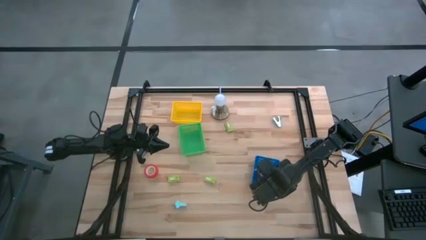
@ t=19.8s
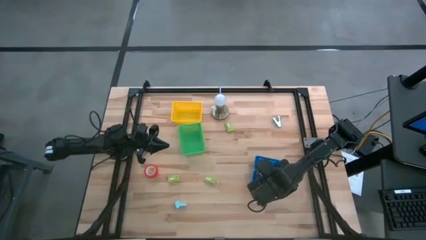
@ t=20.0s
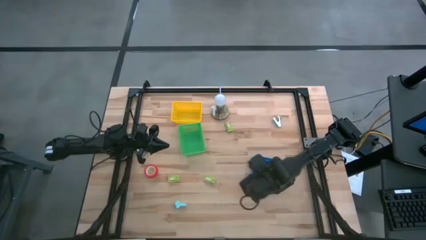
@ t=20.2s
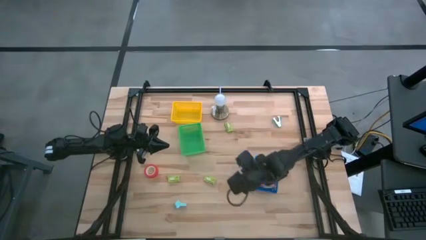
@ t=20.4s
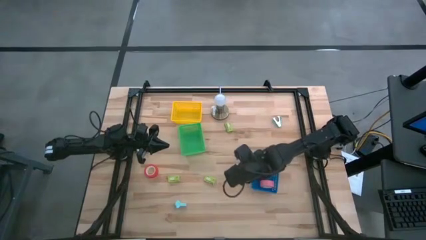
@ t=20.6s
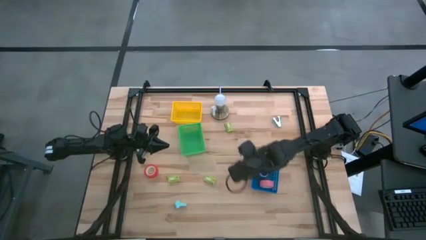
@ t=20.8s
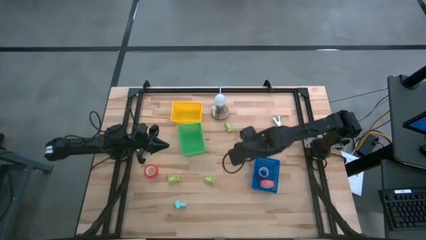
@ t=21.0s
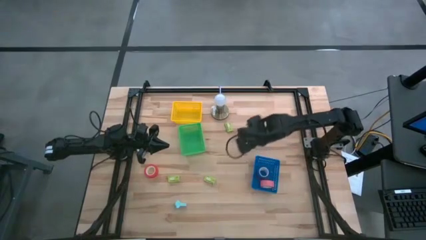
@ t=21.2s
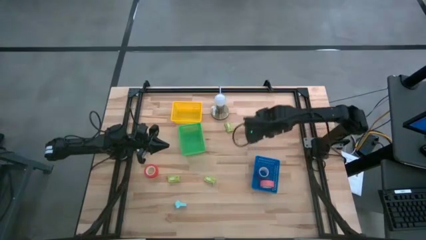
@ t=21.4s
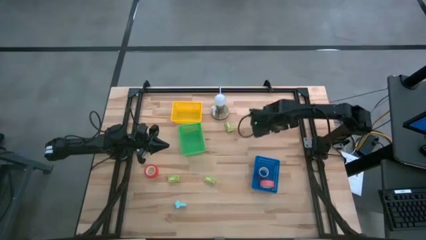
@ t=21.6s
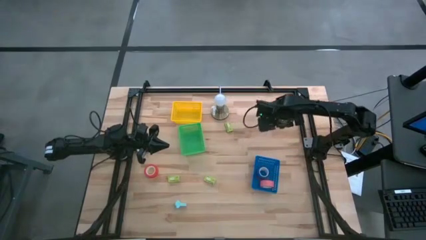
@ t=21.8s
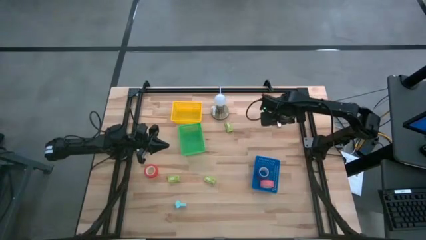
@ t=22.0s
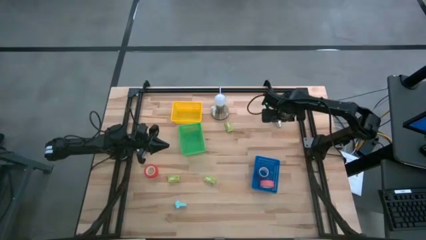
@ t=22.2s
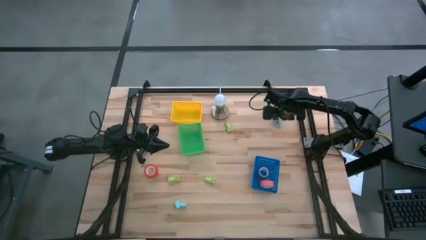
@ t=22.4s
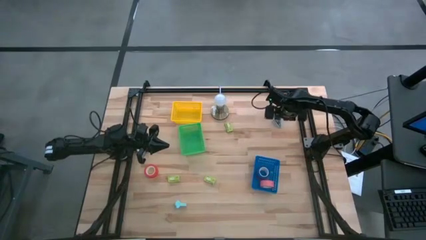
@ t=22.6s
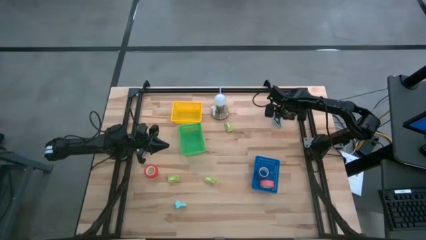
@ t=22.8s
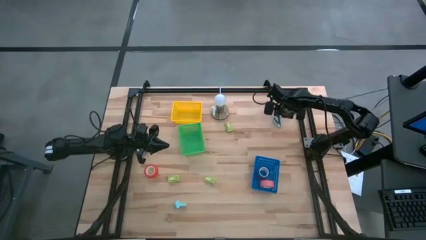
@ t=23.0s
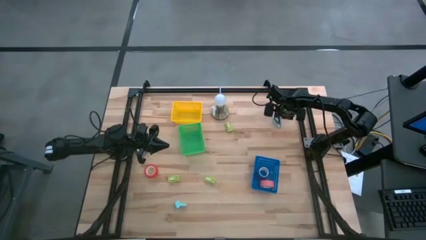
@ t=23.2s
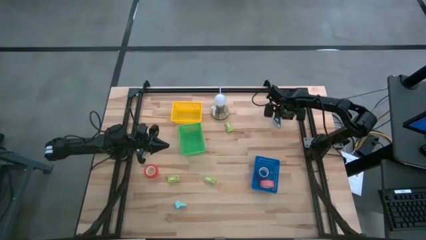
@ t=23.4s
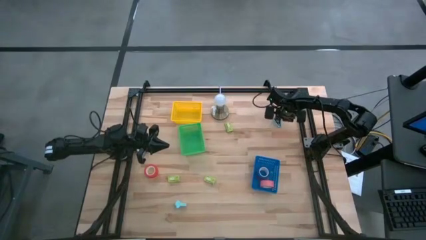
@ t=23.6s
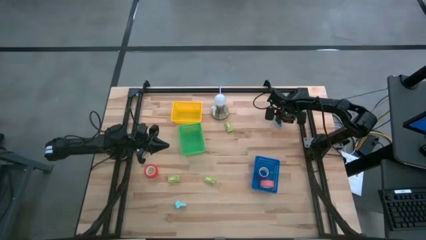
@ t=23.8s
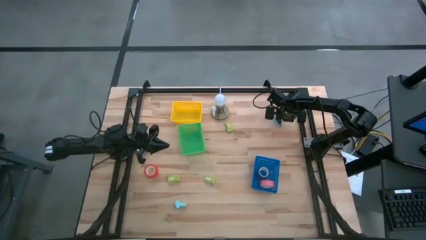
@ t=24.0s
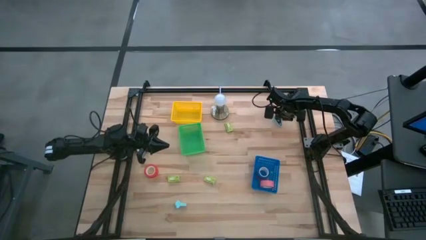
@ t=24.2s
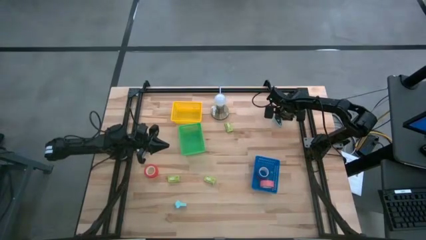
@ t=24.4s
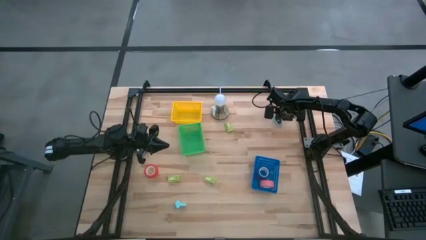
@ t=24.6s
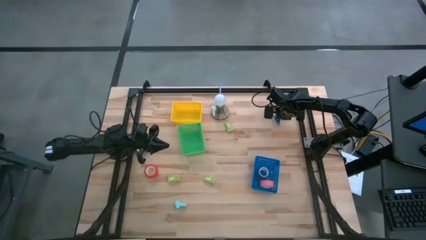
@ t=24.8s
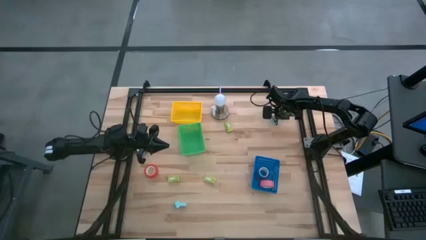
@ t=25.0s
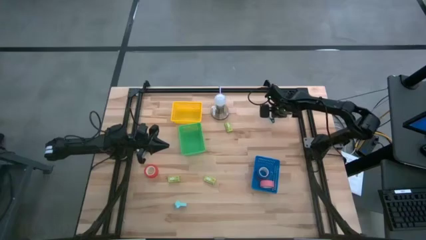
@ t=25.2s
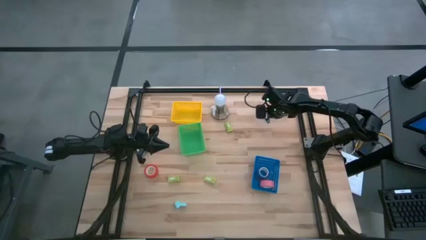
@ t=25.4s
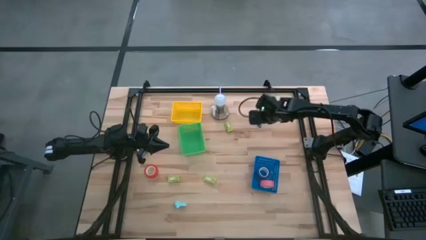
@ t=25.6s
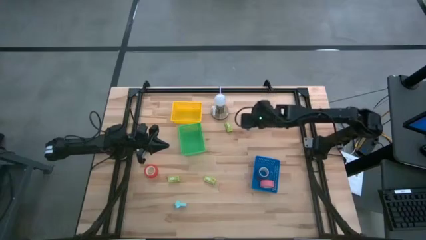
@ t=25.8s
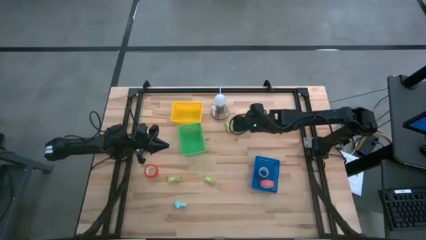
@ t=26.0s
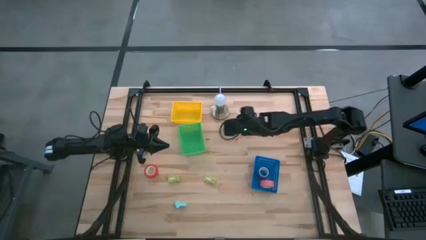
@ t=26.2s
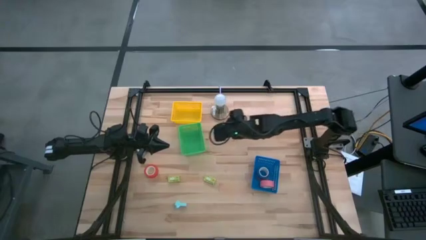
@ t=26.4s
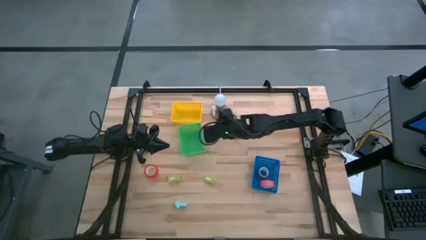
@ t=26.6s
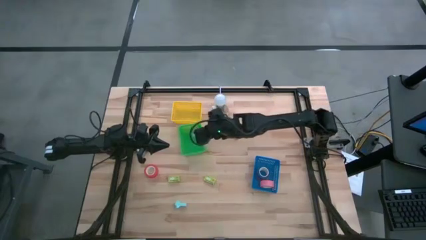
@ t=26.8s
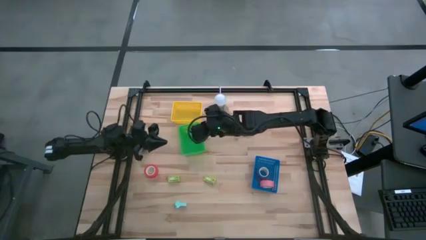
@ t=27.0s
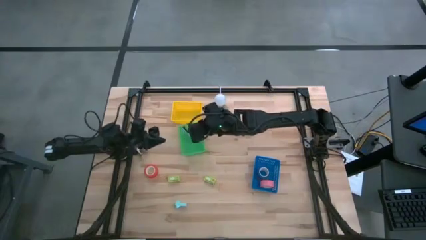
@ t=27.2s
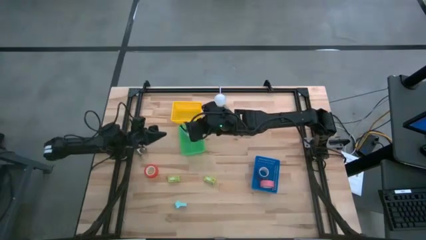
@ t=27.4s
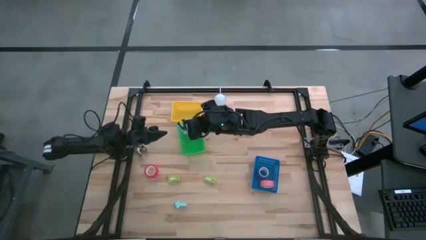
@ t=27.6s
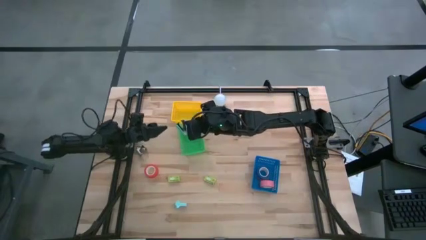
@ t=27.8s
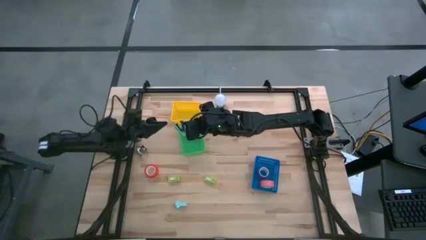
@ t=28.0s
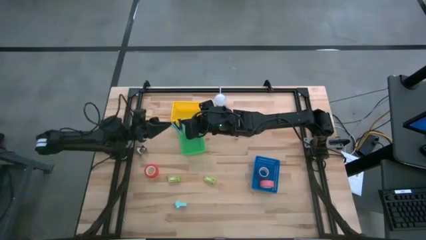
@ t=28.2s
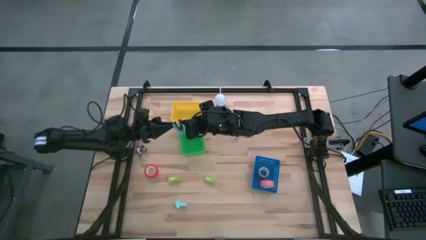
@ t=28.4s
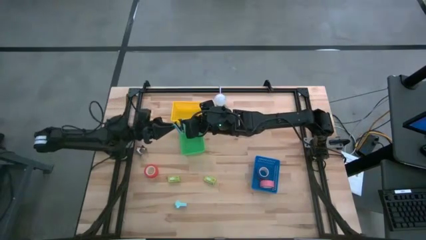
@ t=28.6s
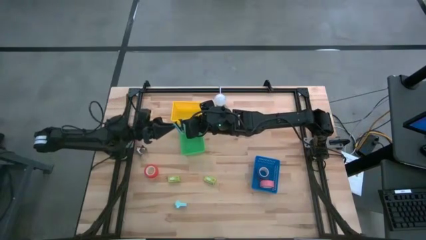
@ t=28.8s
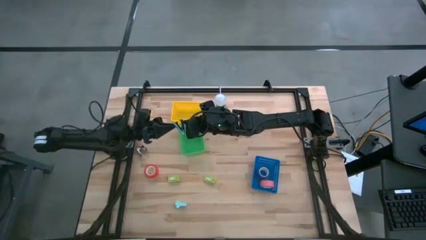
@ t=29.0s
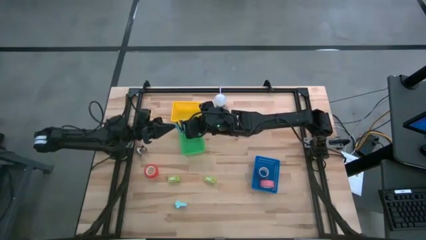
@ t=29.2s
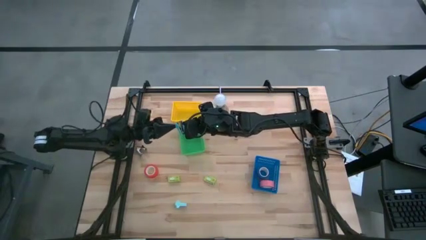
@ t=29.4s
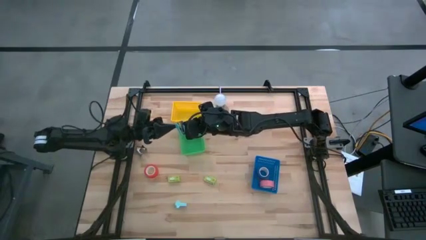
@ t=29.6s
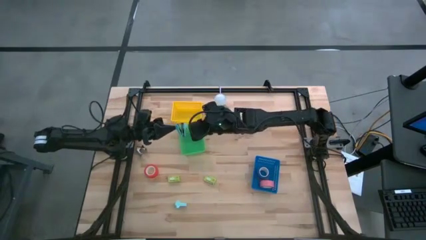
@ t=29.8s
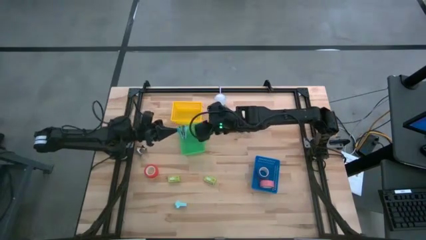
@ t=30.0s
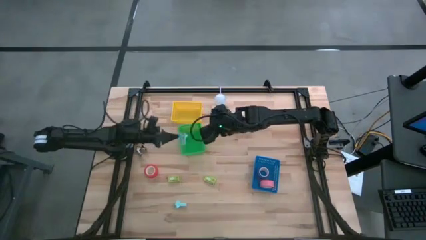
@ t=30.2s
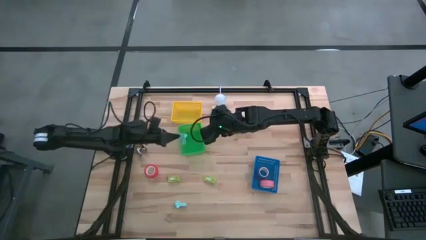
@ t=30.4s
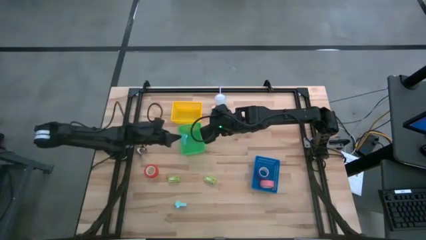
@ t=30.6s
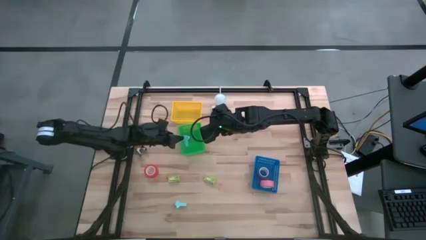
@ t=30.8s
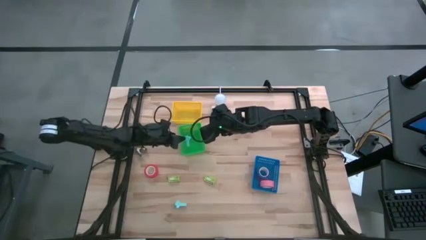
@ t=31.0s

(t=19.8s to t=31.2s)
Task: Pick and place Stapler, Stapler remover, tape
Put the light blue staple remover into the green bin

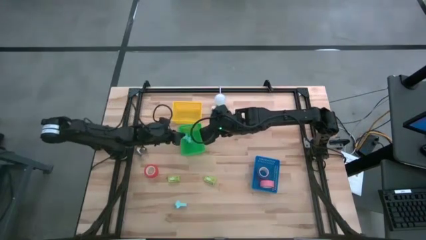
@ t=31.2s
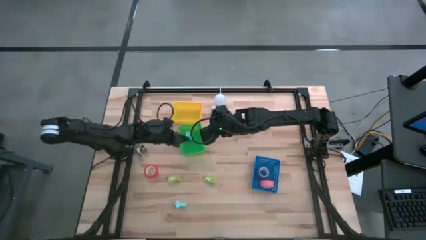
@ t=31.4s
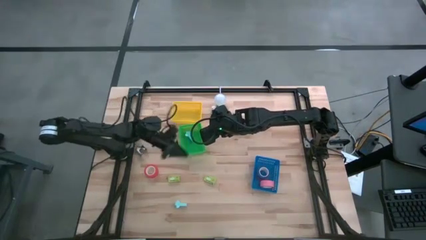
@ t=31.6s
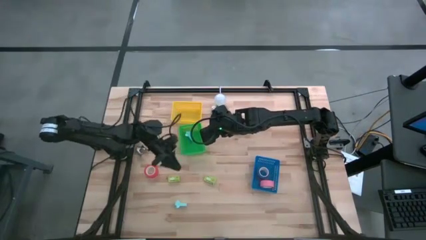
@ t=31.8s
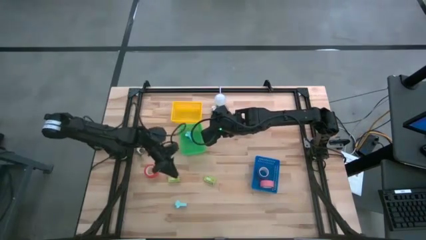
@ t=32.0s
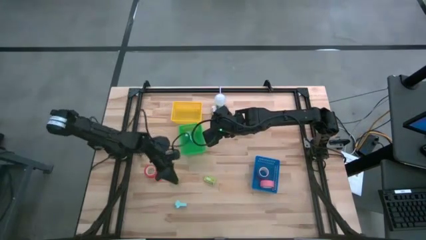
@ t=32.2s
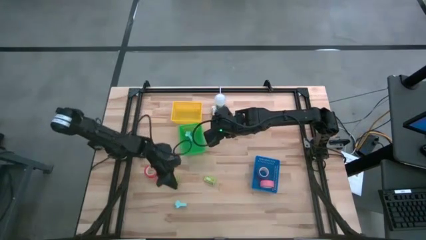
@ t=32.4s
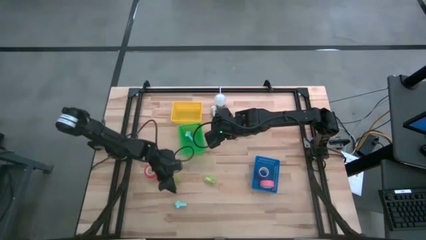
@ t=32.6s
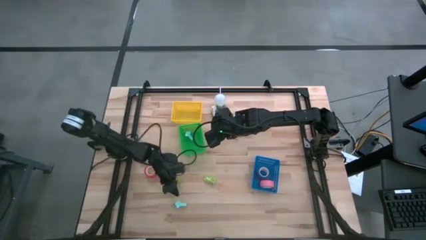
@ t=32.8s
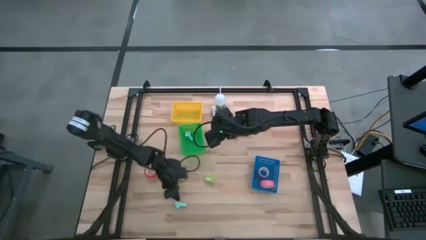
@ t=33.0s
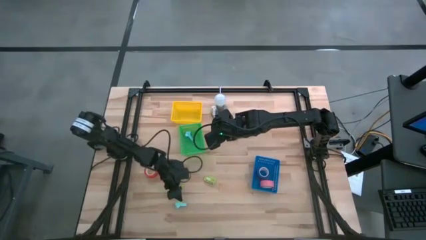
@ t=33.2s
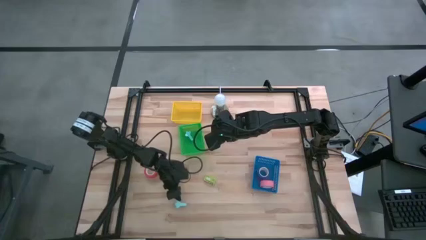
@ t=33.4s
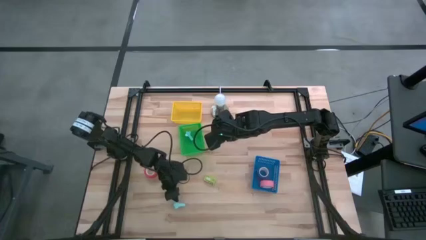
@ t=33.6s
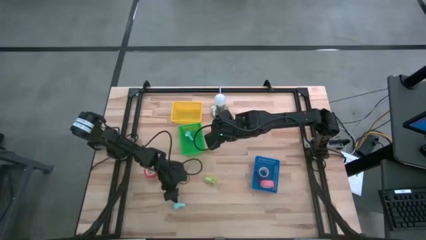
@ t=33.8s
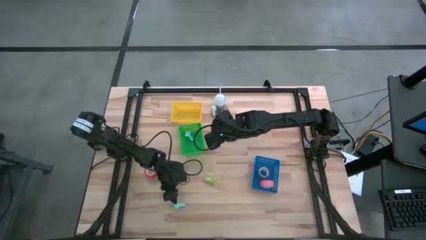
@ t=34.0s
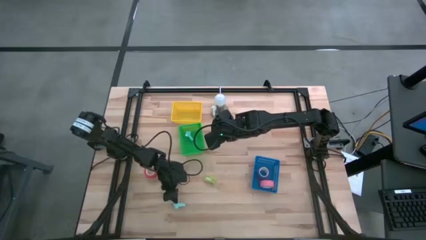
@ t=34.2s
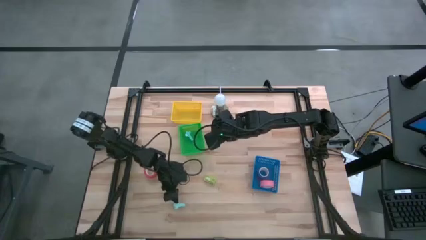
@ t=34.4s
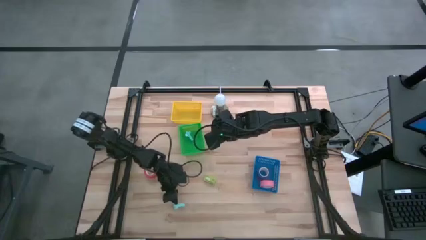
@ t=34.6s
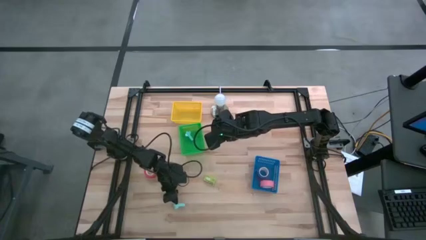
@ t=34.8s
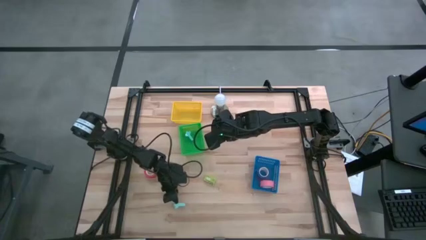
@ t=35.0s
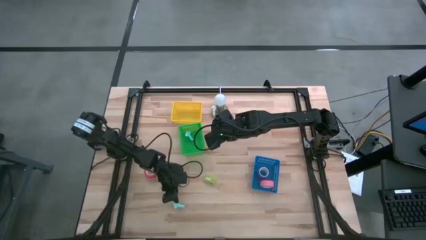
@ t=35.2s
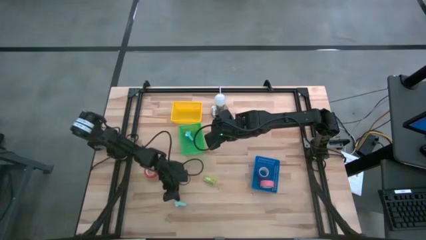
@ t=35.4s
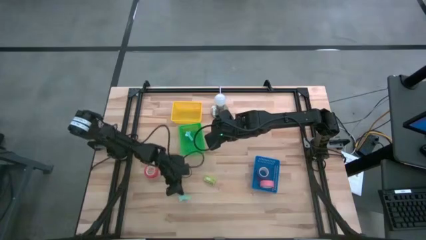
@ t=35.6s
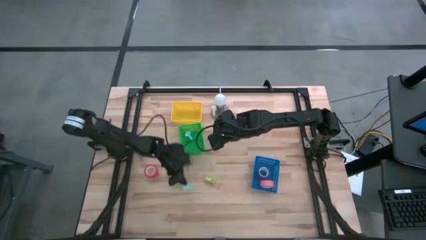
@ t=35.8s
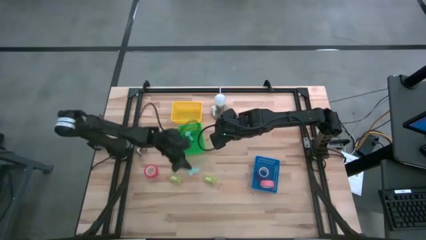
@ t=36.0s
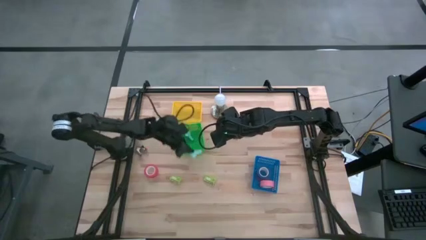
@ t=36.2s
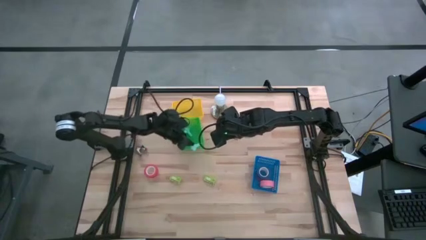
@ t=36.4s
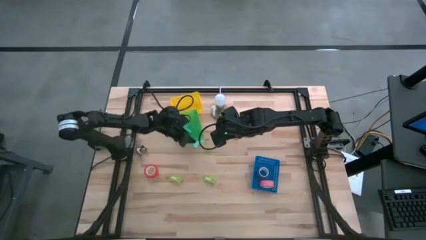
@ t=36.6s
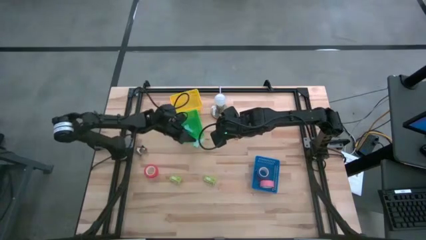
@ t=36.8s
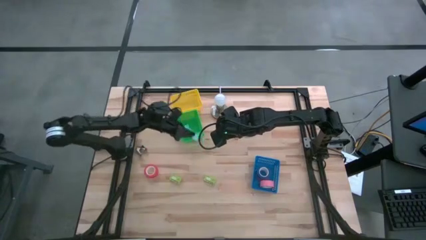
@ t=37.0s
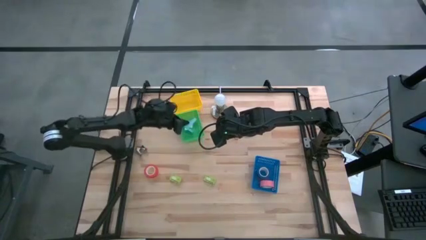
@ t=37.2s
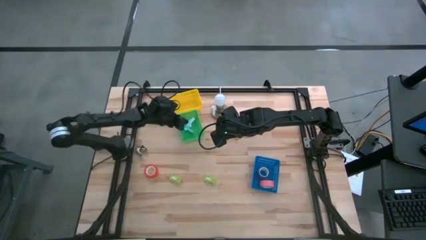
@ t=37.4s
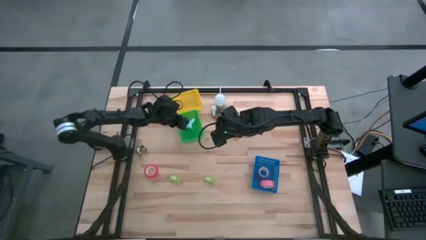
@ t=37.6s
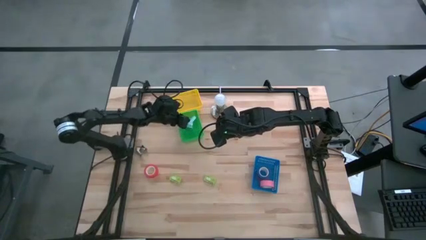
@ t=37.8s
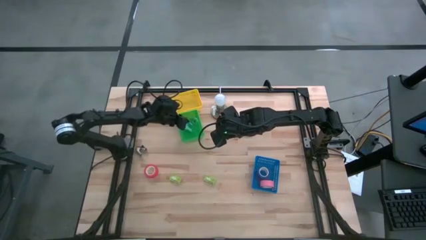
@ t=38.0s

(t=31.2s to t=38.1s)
Put the light blue staple remover into the green bin
